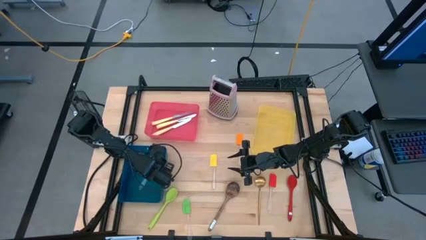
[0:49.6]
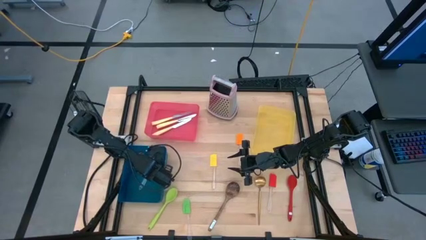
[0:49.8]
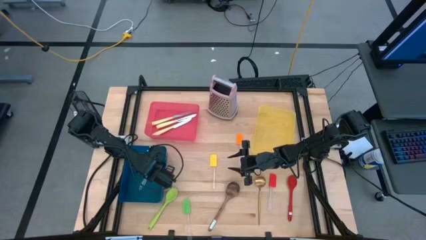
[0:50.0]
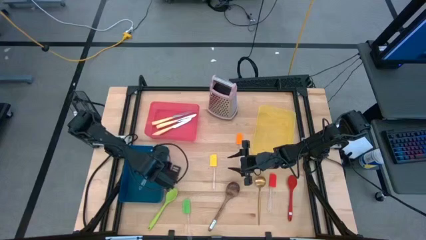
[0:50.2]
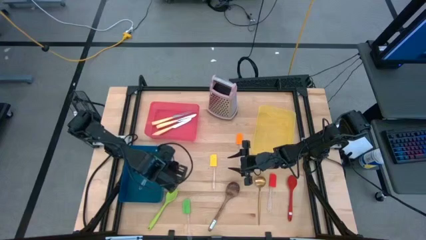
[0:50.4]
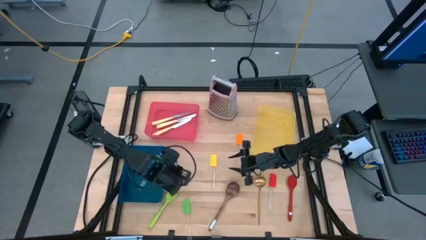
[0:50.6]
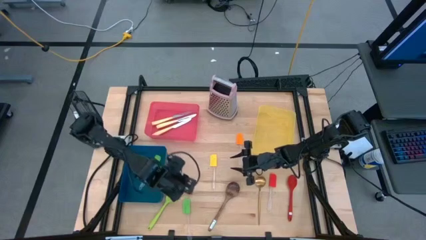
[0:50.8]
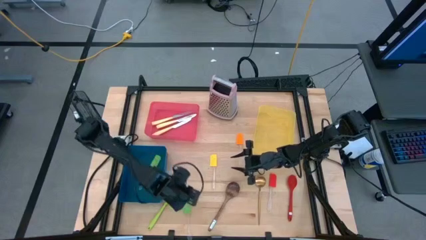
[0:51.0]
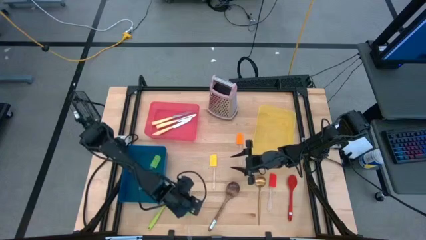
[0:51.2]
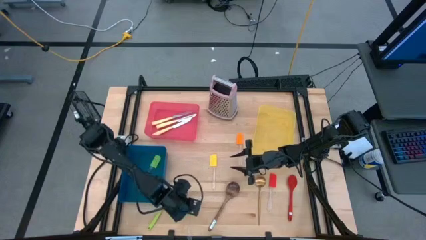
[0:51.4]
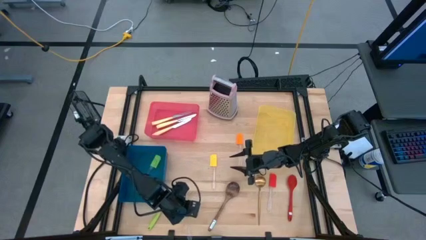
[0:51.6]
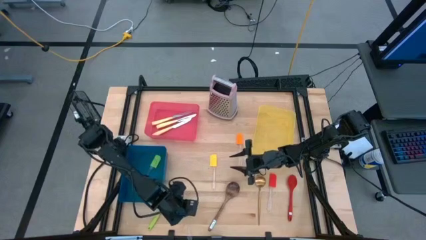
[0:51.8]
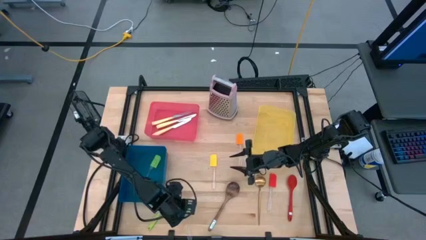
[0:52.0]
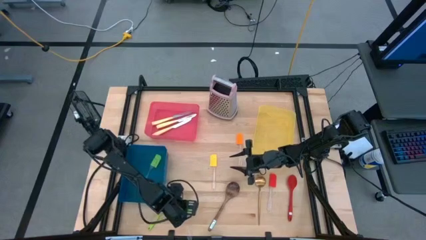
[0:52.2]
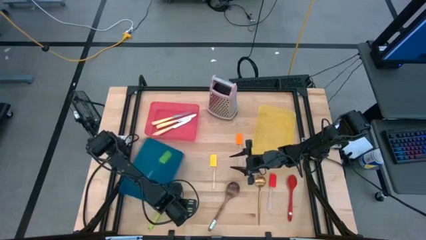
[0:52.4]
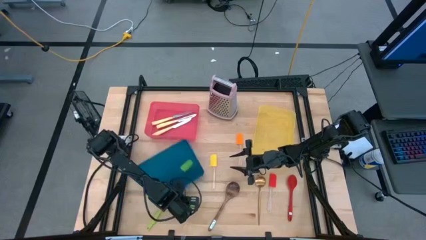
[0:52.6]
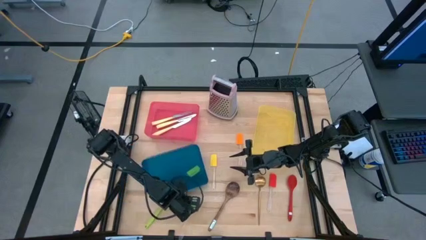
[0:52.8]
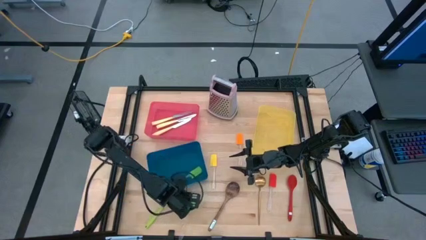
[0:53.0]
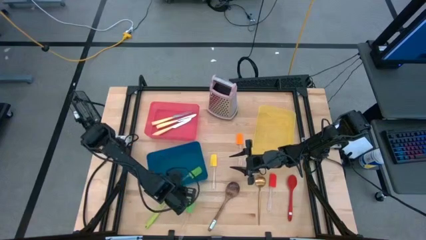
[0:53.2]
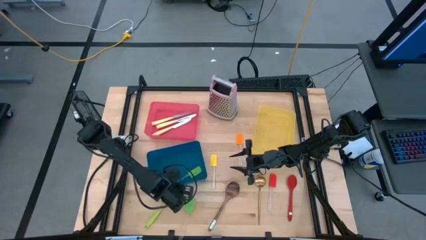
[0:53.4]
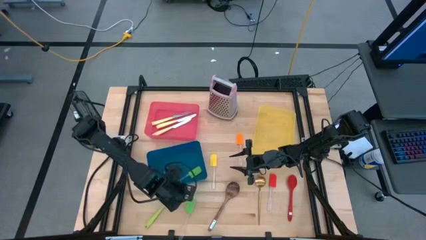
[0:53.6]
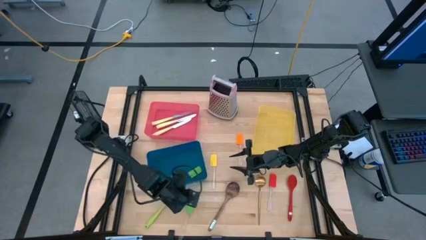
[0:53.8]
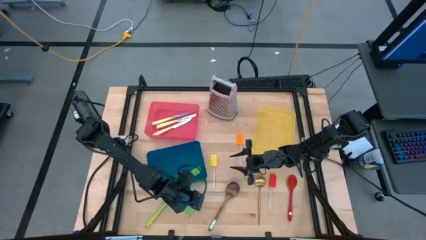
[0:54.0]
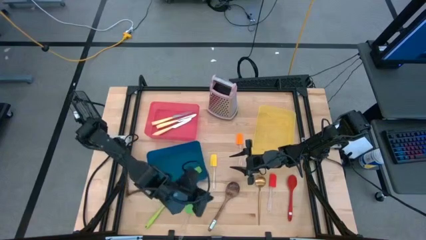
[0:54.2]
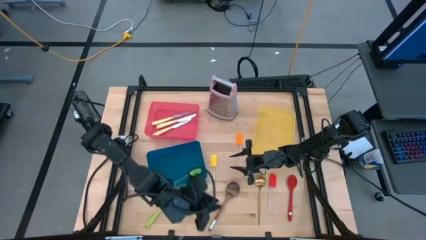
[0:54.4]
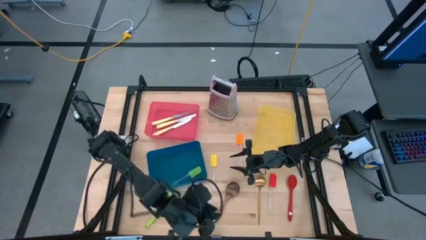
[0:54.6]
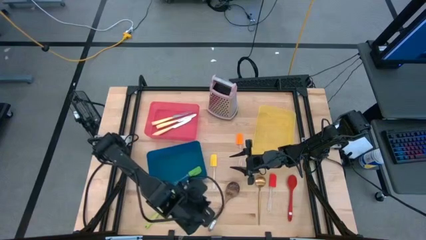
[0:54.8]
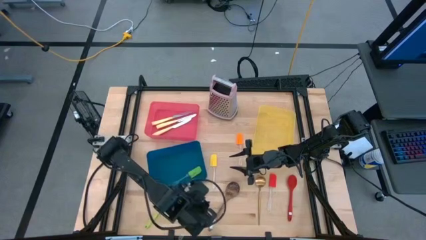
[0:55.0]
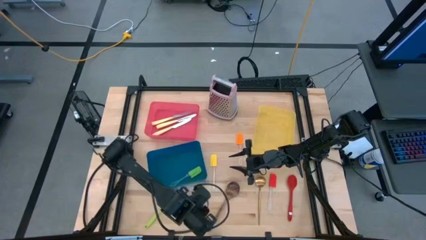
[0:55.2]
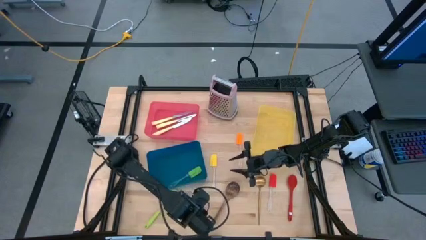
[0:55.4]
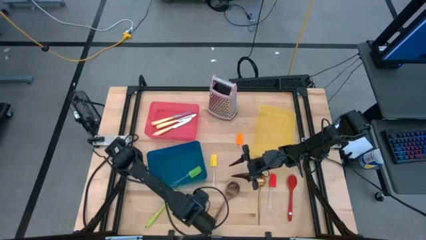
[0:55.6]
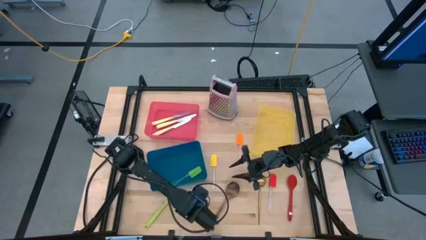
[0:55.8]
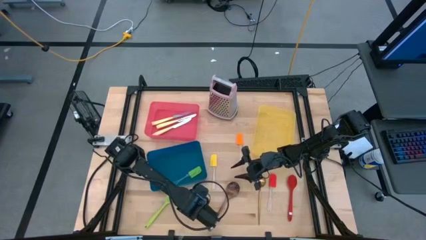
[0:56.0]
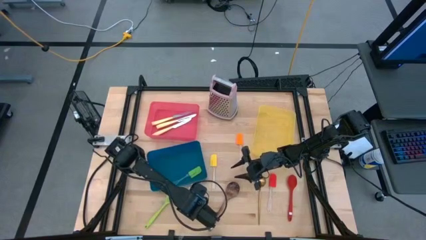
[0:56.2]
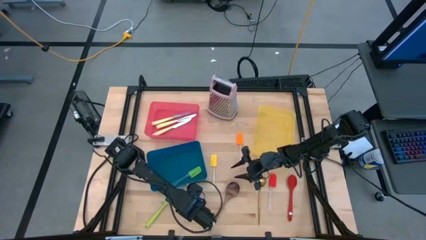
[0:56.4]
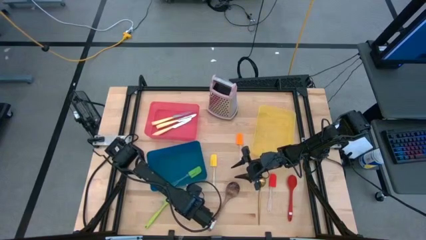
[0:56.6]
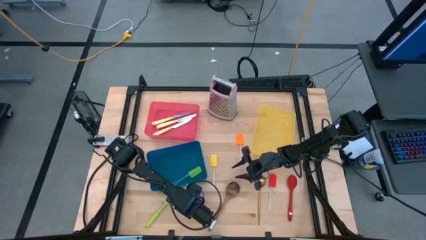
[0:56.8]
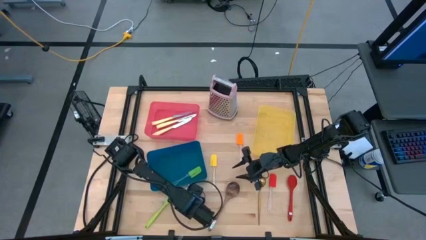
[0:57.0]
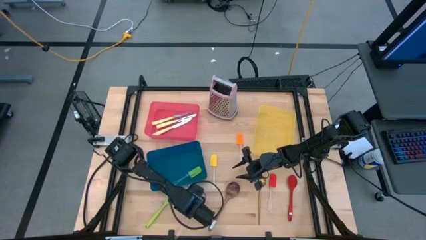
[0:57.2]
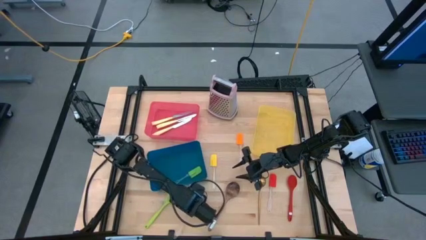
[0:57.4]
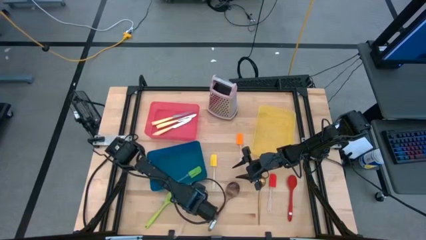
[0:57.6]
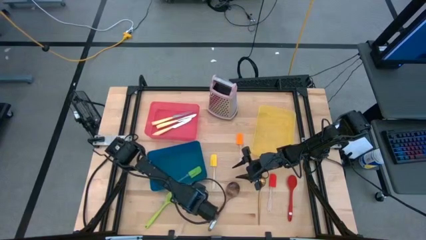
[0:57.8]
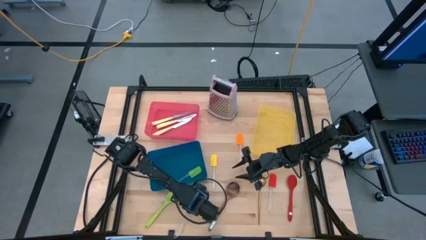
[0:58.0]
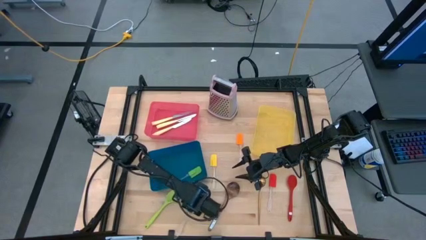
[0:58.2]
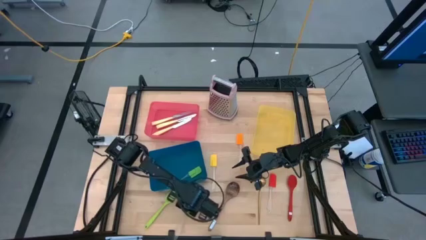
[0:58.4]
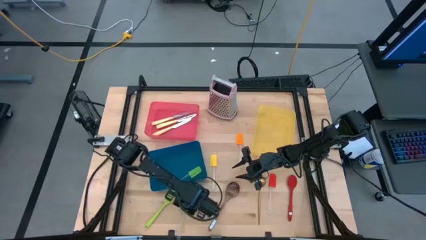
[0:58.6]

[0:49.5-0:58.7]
Task: Pick & Place Kitchen Items
Put the green spatula into the blue bin

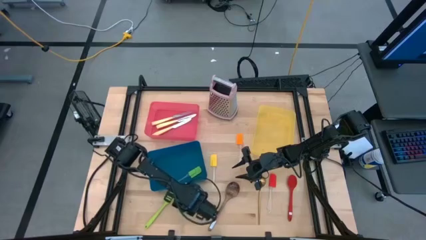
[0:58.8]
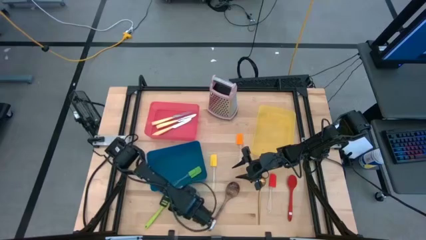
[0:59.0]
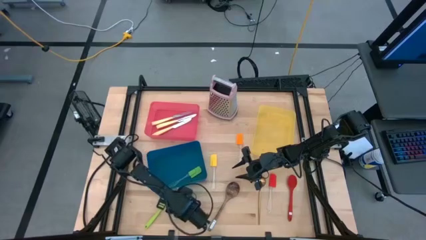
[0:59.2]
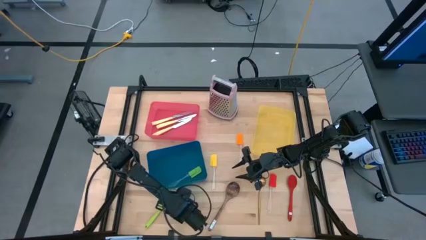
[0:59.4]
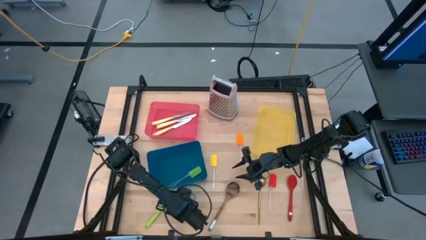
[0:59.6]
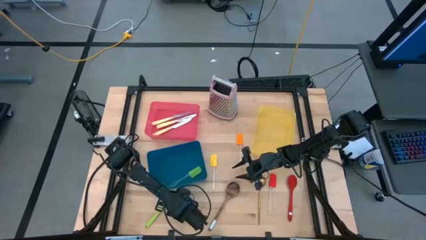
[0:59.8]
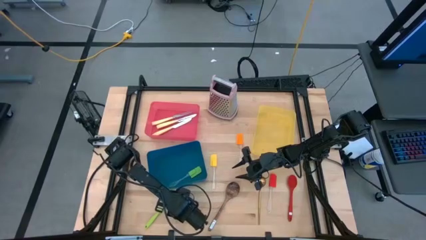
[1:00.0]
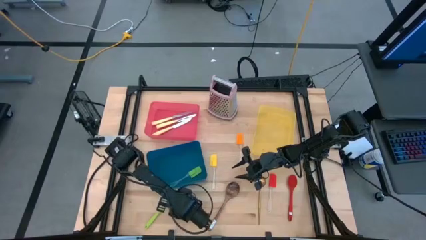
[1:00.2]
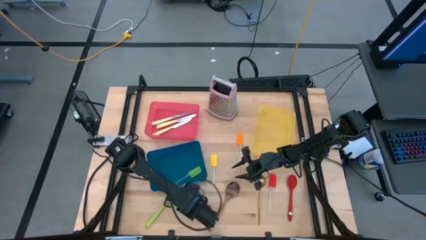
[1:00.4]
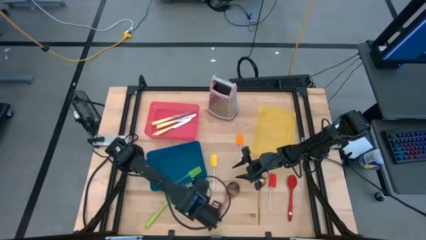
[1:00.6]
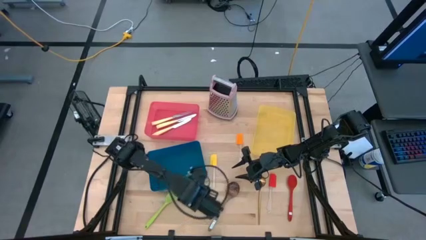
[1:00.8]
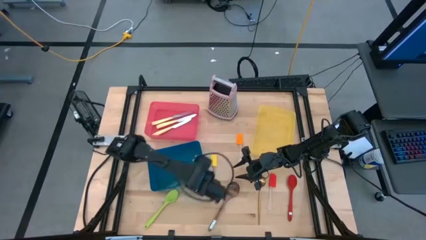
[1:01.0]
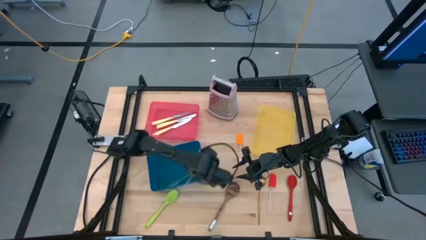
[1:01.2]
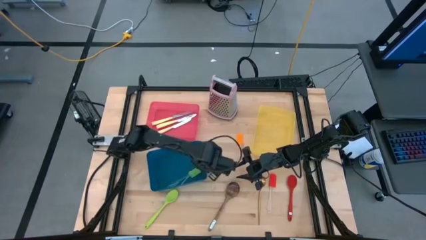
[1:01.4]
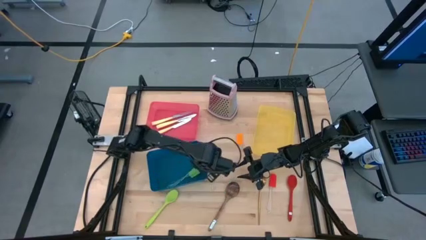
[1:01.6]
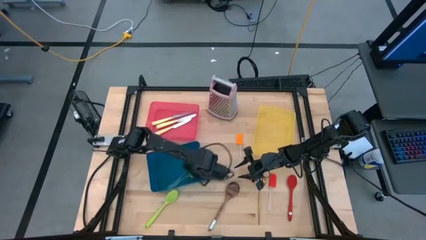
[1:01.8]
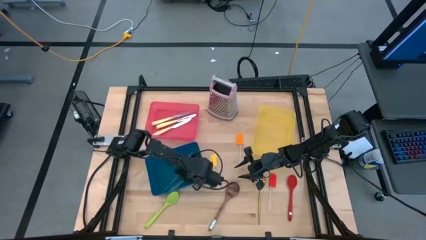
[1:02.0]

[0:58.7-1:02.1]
Put the green spatula into the blue bin

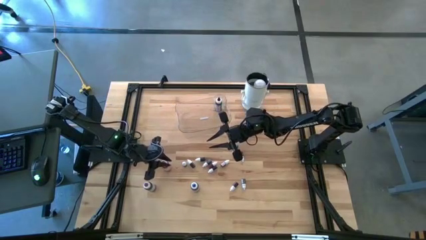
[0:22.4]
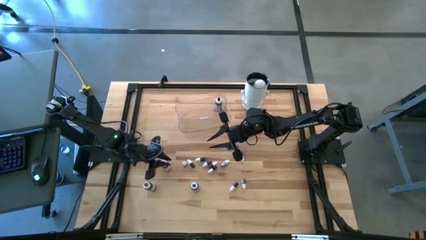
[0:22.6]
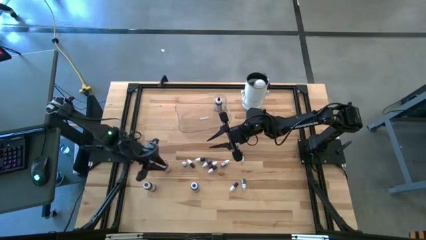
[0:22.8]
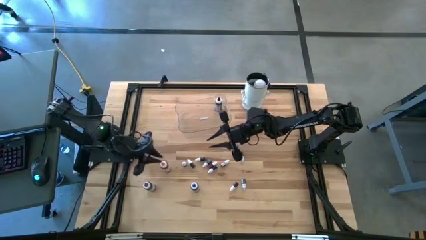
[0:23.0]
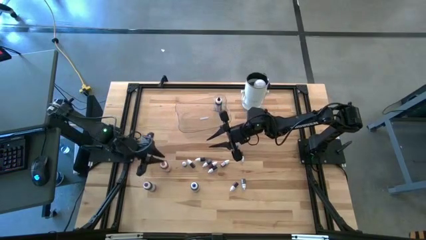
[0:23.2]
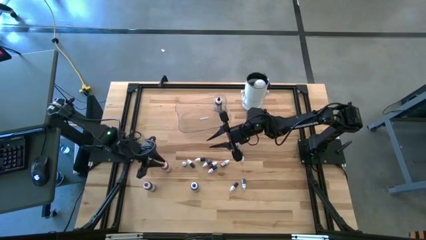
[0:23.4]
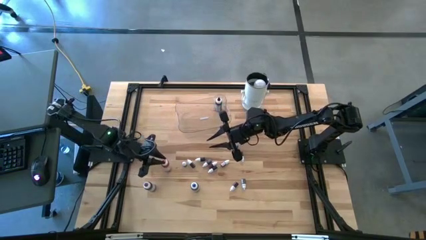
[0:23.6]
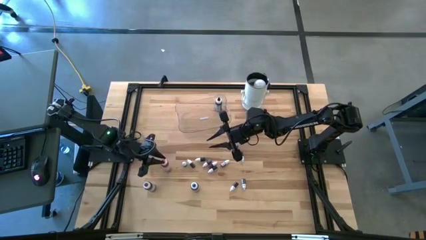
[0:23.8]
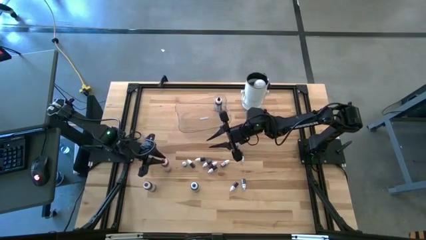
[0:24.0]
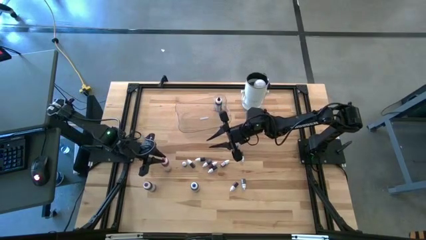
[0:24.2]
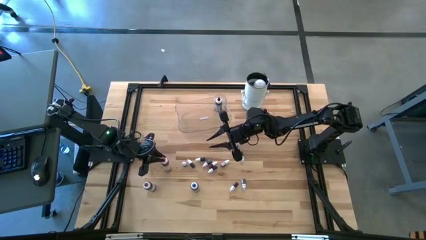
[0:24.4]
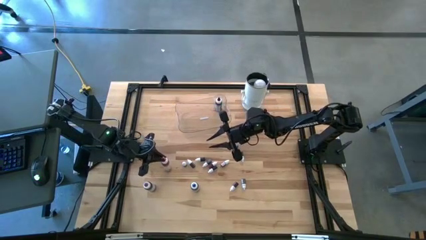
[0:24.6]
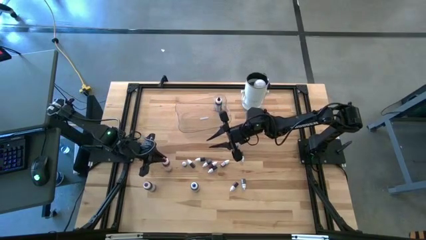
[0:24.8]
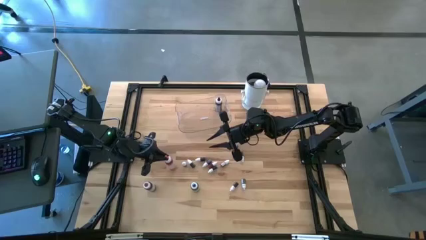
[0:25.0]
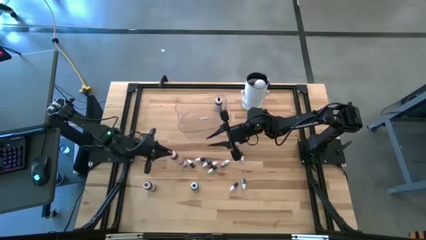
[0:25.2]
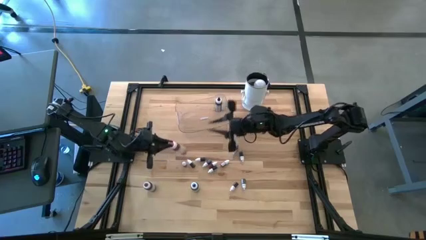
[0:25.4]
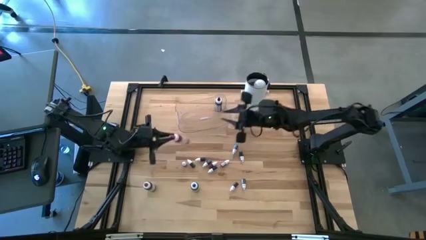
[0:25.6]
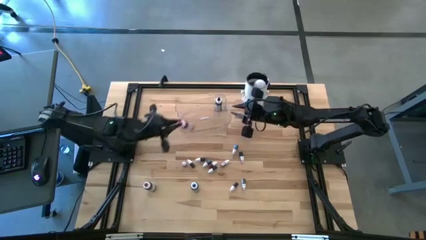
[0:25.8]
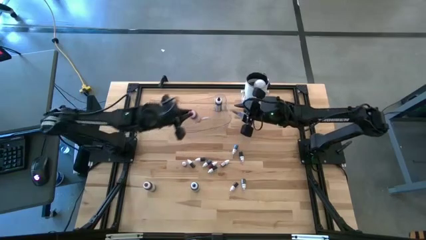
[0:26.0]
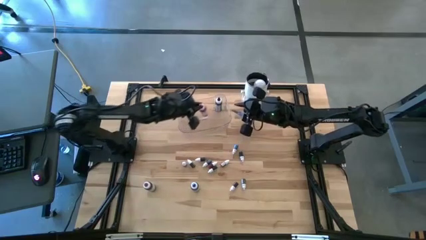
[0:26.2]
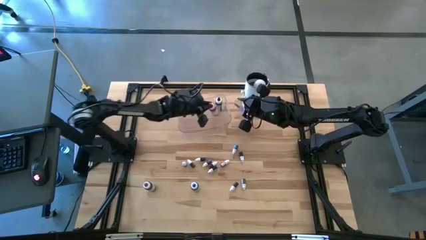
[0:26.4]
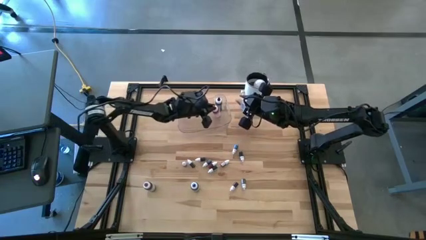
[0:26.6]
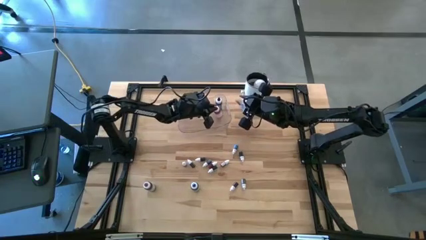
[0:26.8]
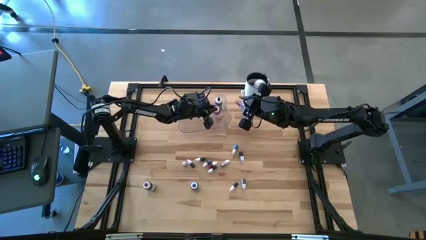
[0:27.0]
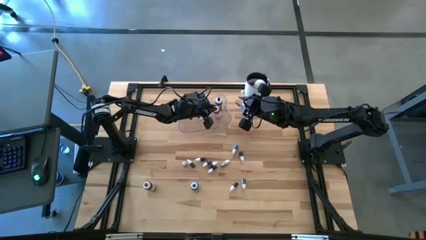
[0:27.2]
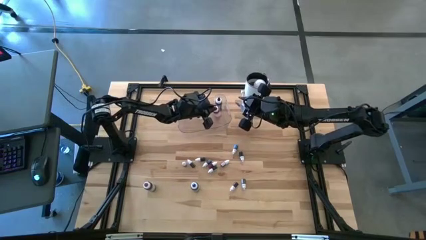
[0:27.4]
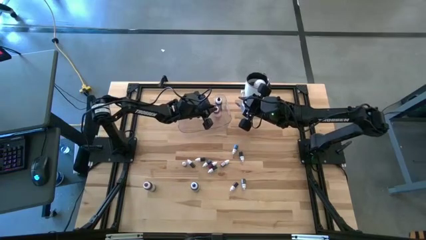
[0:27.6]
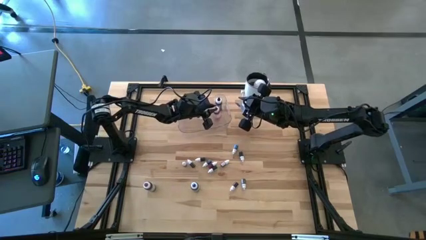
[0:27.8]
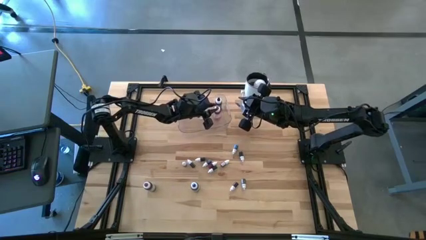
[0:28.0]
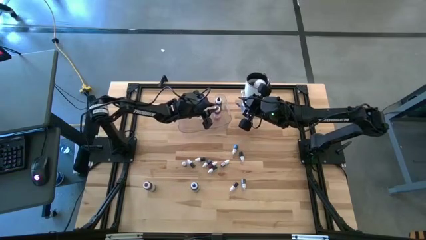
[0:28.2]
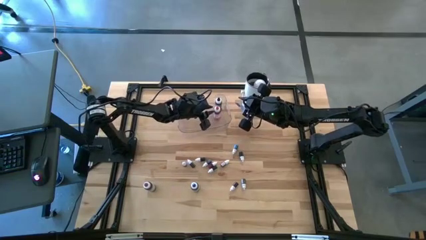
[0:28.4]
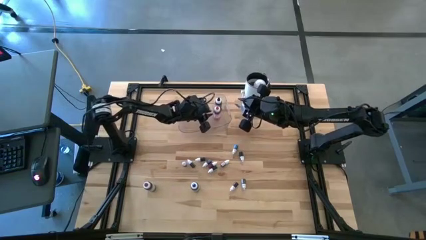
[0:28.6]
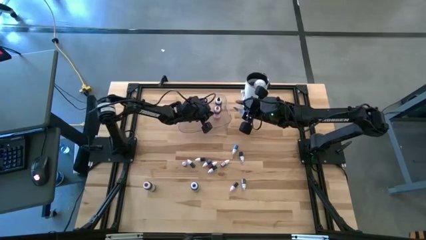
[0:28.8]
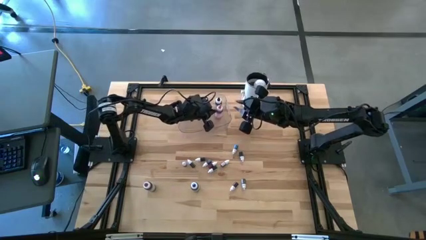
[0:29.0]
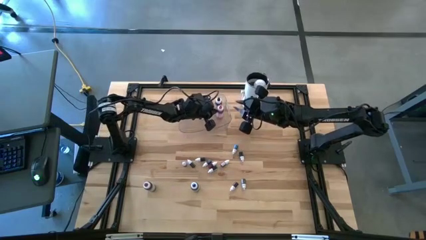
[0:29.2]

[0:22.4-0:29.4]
Task: Pick & Place food coloring
Put the large pink food coloring bottle into the transparent container
